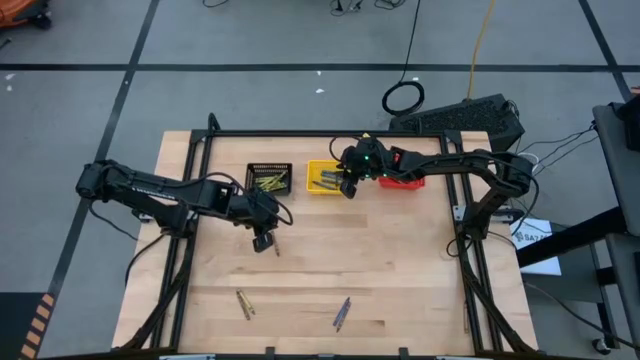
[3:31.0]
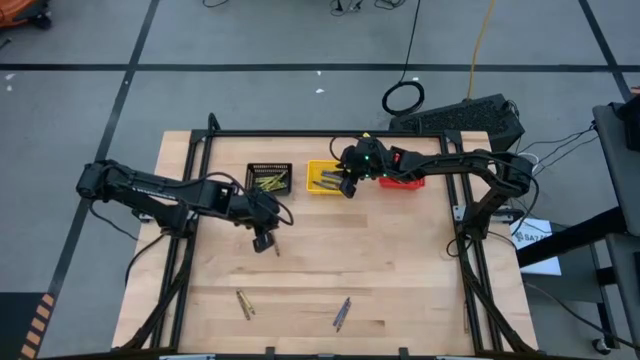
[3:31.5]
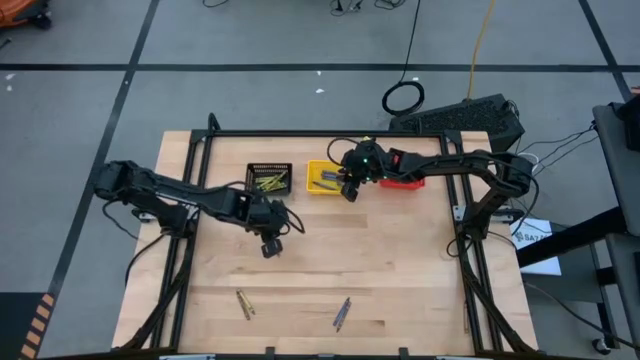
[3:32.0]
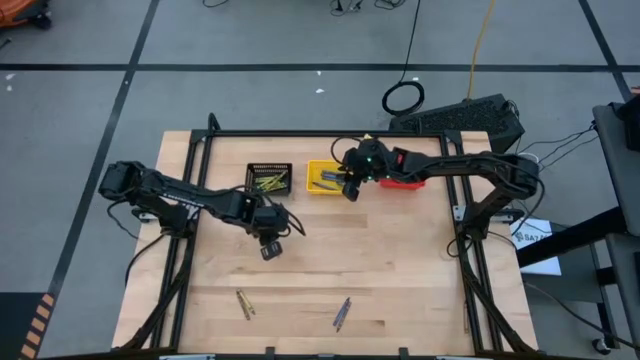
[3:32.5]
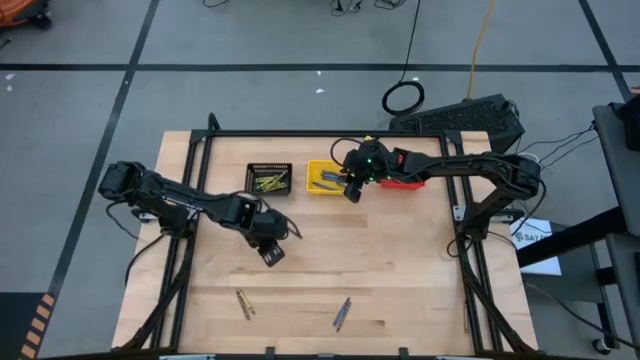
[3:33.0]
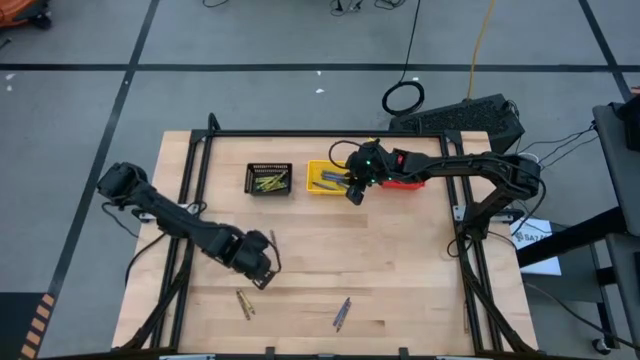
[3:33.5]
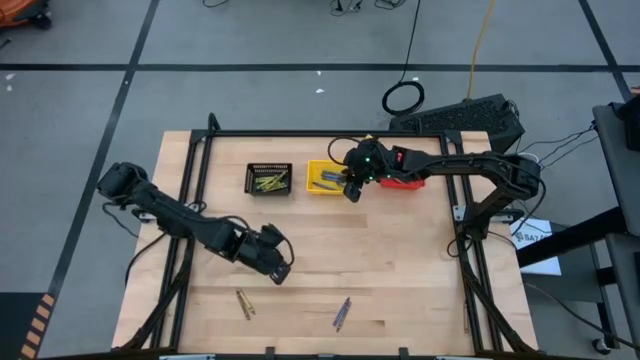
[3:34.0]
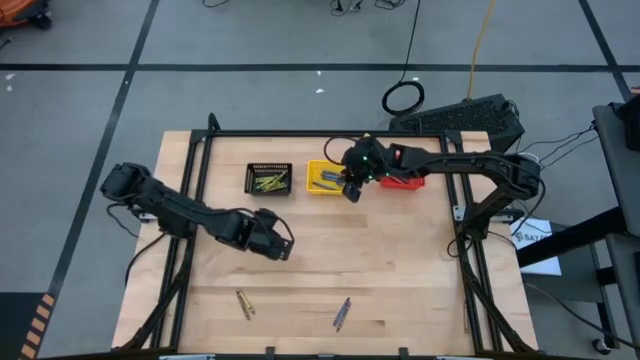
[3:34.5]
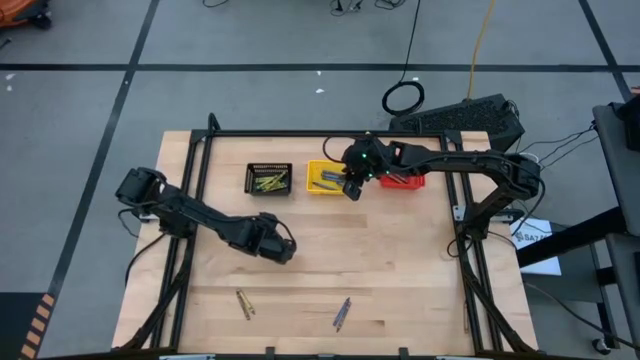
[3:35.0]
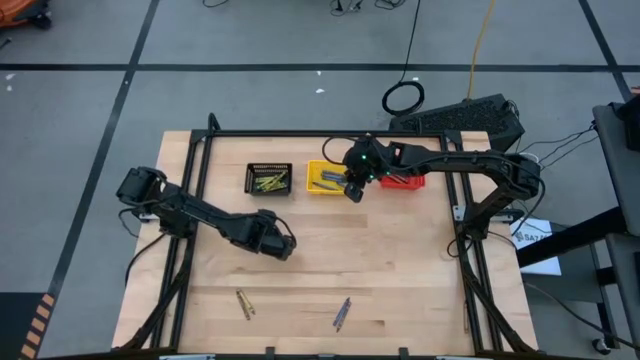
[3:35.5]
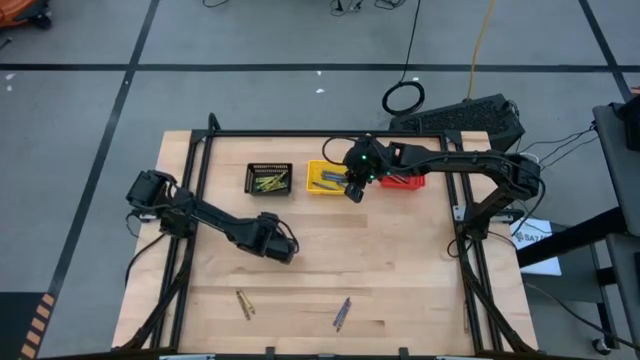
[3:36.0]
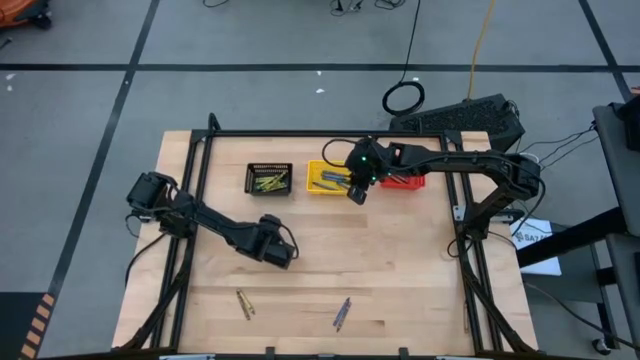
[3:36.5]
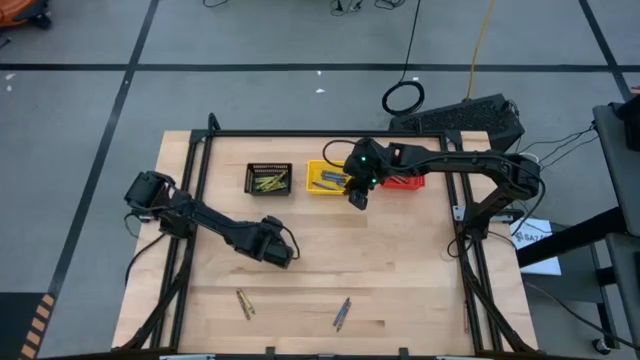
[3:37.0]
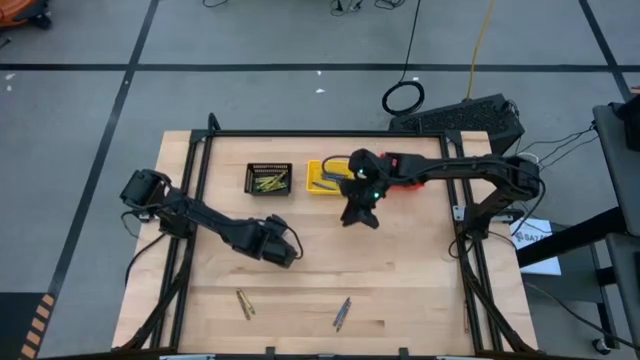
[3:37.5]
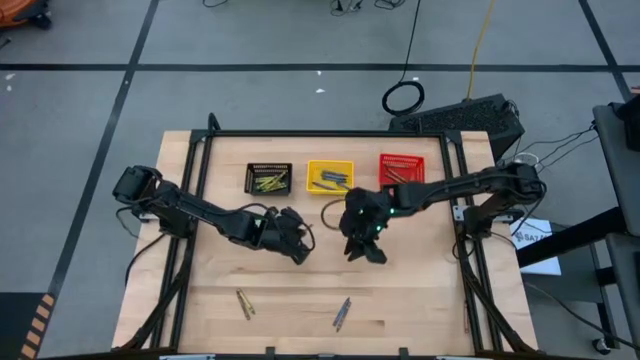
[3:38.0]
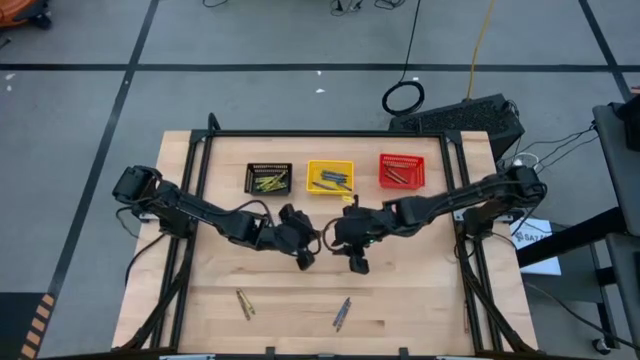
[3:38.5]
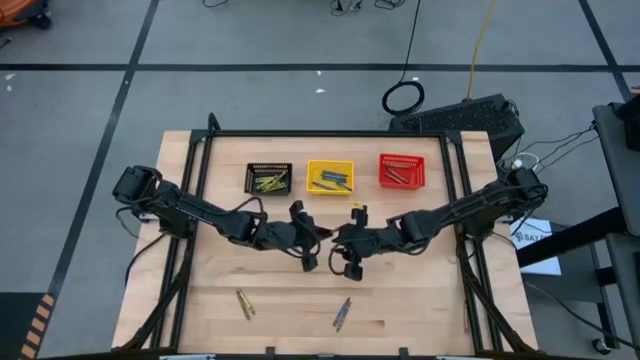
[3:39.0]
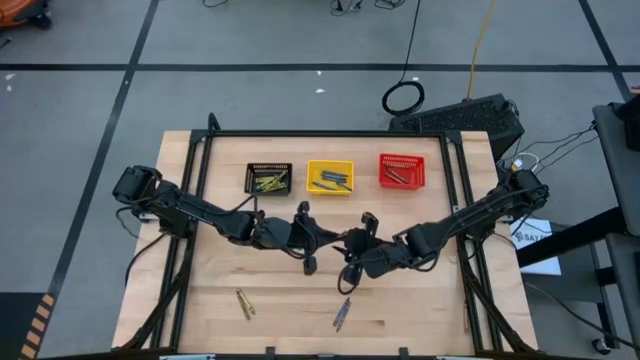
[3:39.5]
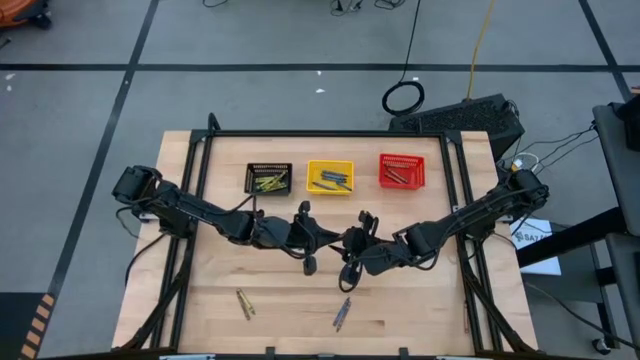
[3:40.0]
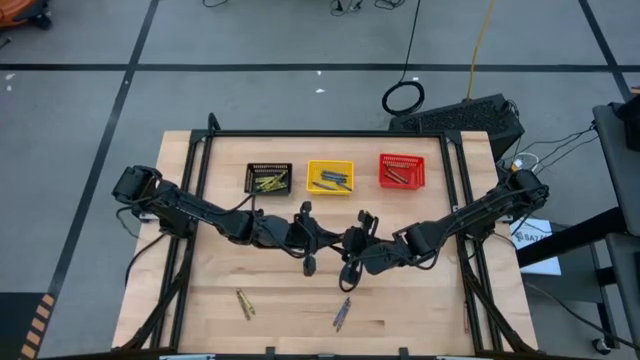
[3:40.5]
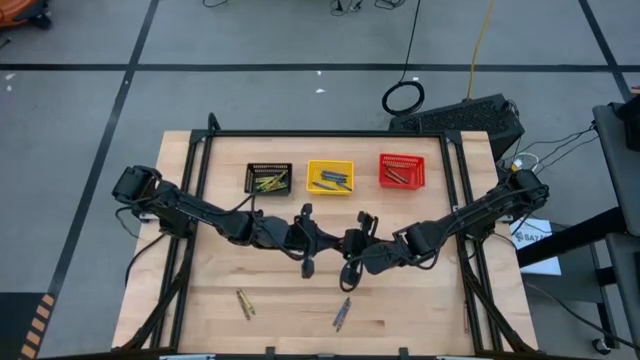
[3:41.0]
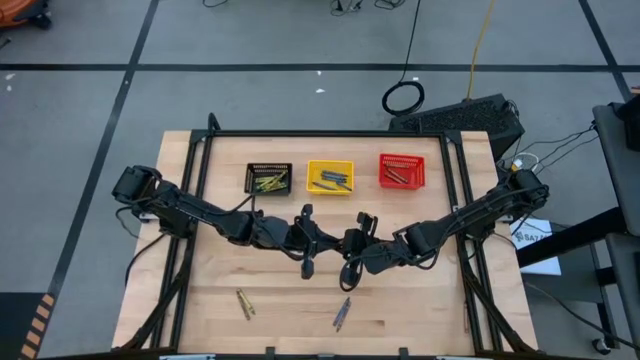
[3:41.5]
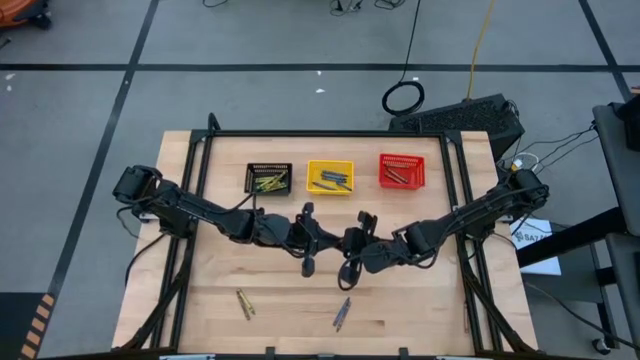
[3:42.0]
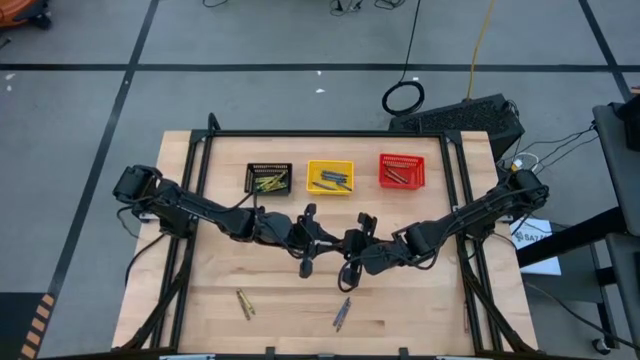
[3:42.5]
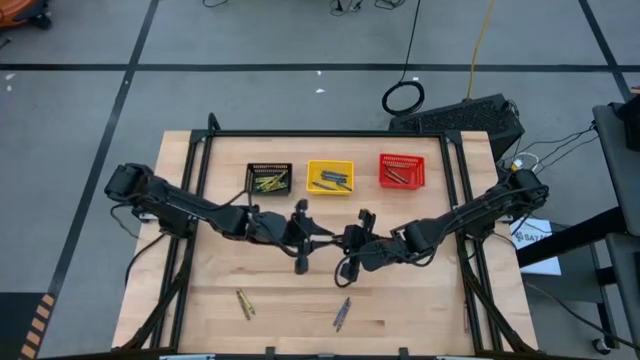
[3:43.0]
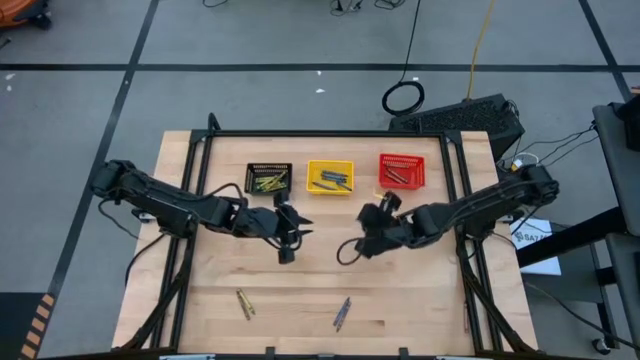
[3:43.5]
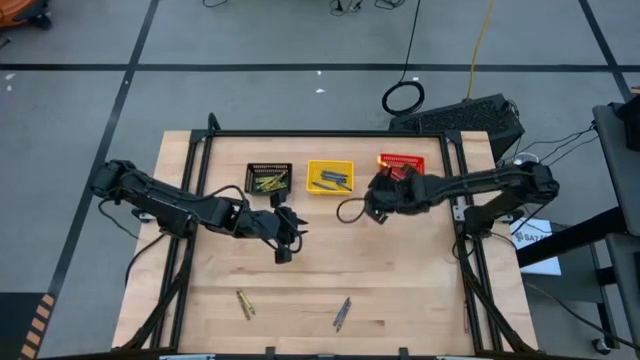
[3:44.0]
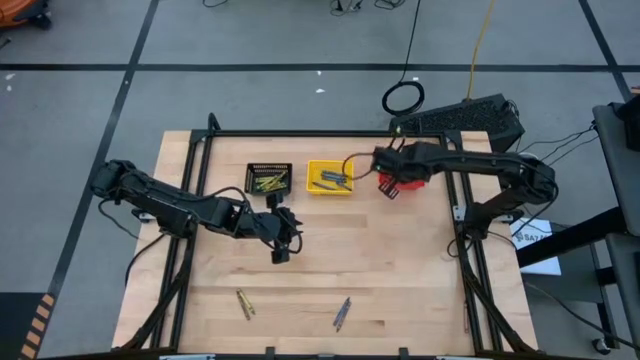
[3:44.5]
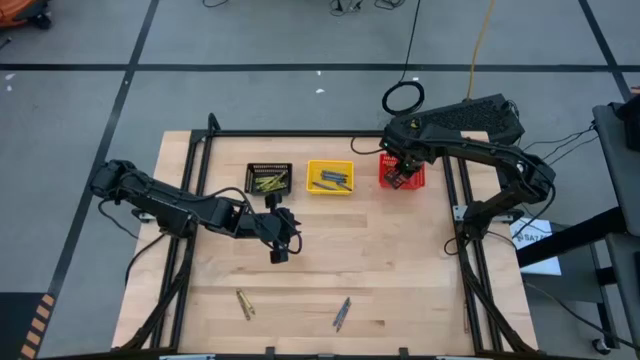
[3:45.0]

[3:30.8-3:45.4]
Task: Sort crayons
Put the brown crayon into the red bin

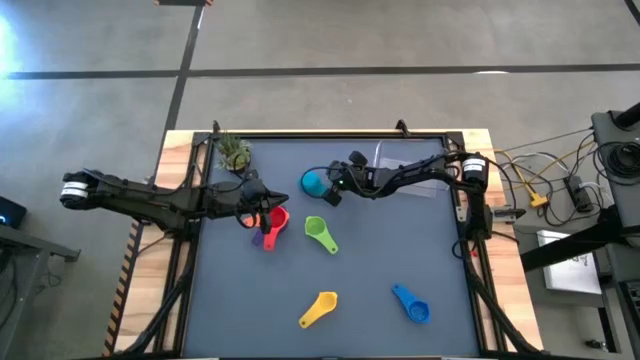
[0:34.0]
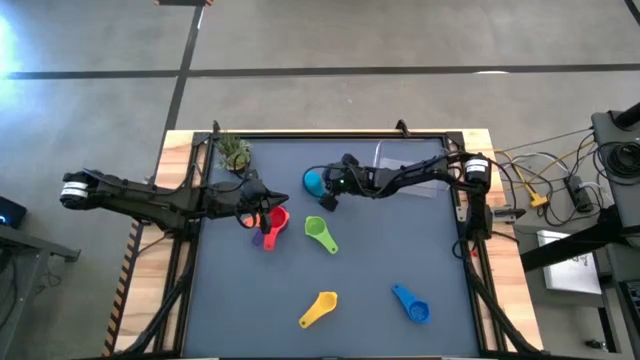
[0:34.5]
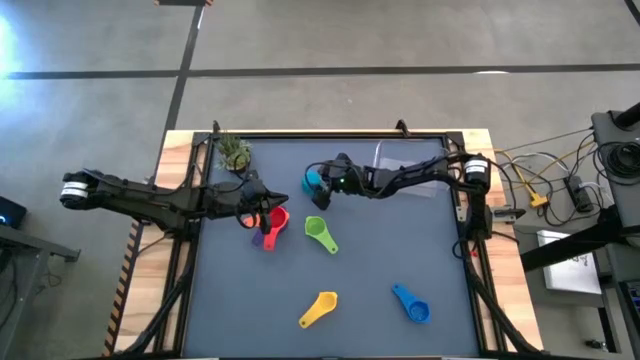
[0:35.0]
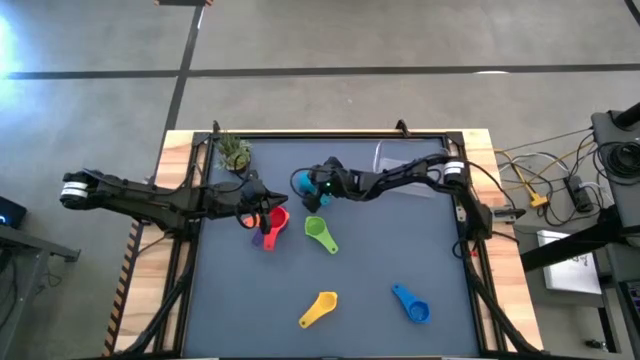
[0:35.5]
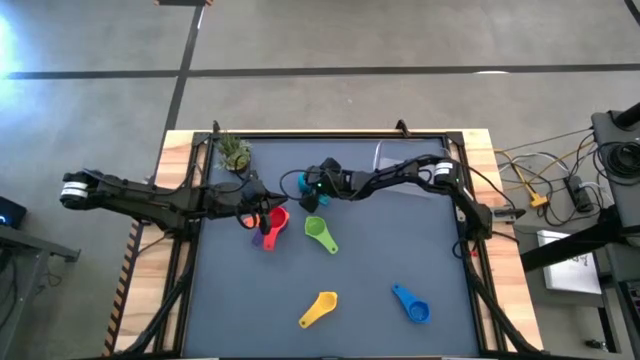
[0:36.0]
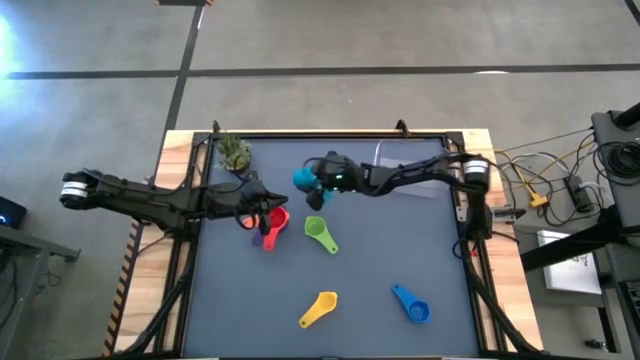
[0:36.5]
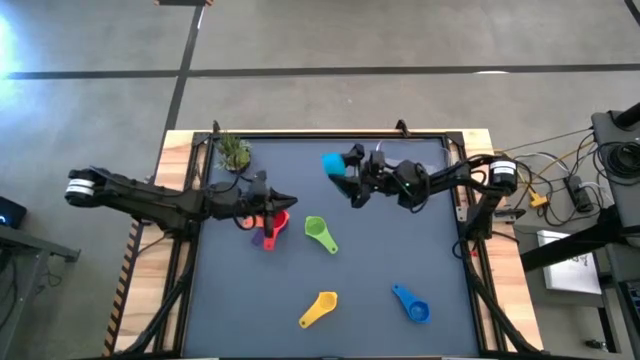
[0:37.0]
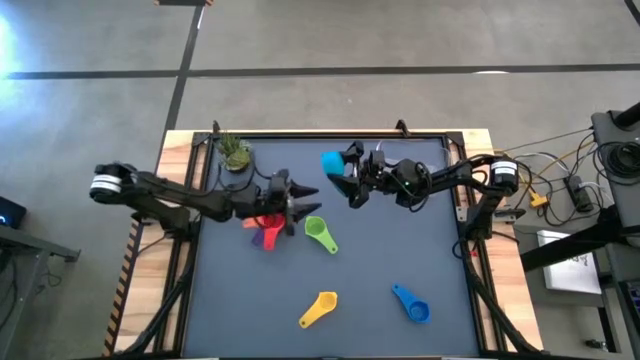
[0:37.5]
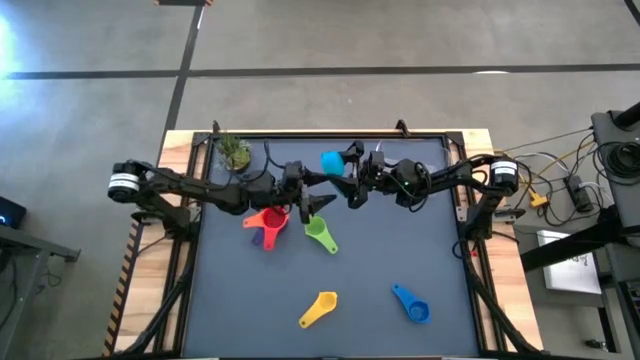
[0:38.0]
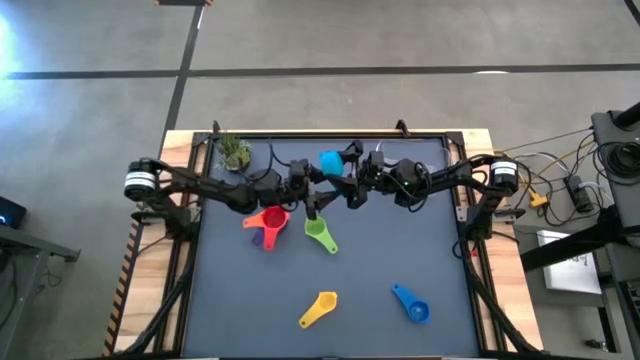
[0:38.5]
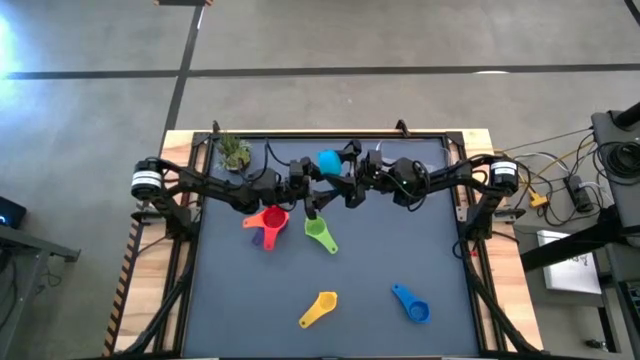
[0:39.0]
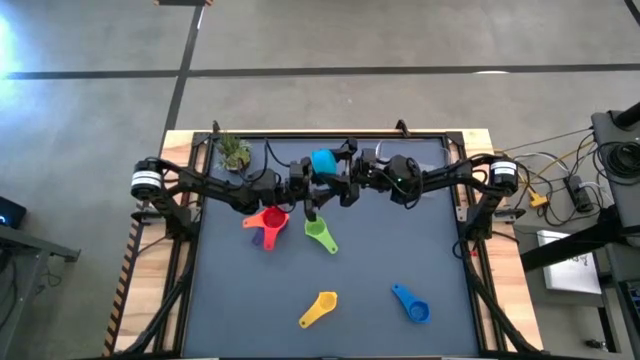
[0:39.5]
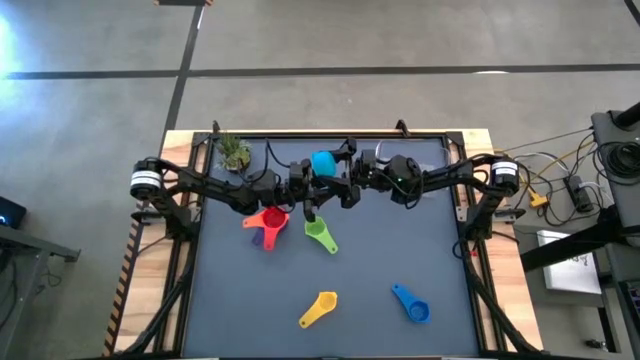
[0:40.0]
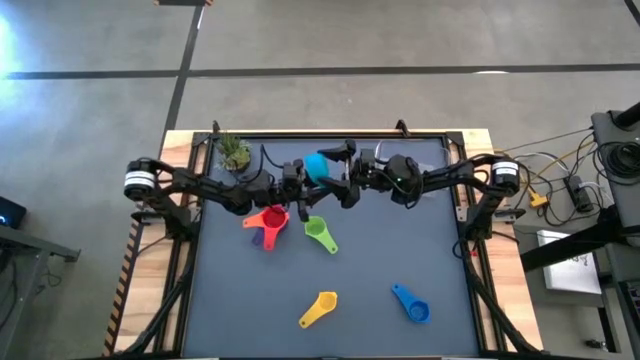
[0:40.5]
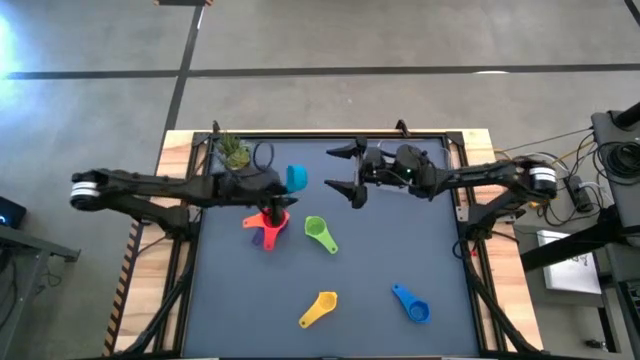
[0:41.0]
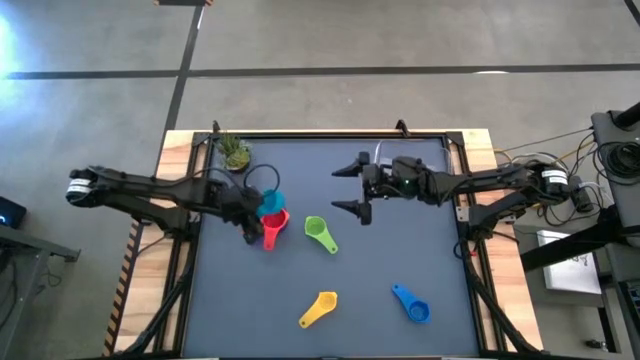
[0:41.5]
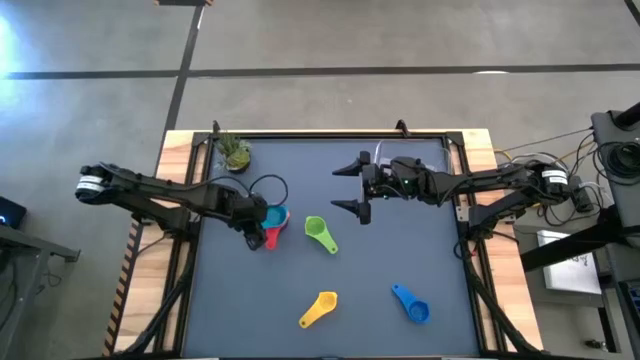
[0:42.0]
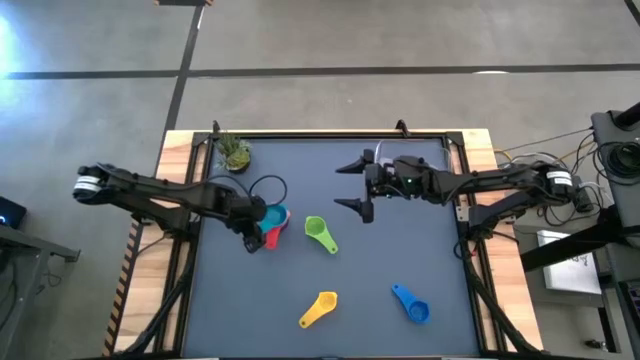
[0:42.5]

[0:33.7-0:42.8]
Task: Nest measuring cups in basket
Stack the light blue measuring cup on top of the red measuring cup
